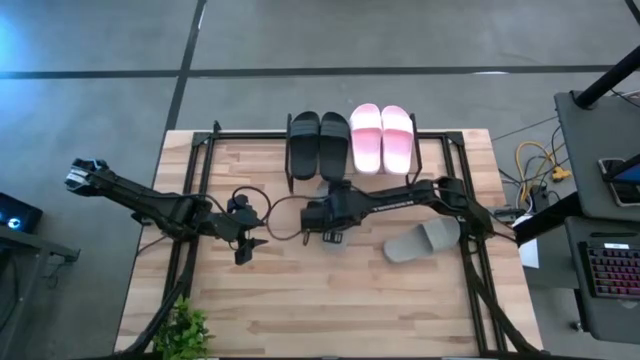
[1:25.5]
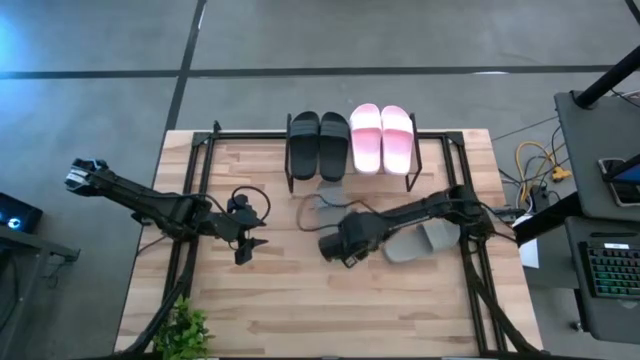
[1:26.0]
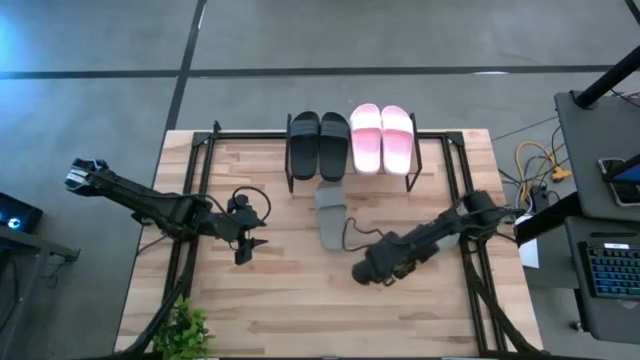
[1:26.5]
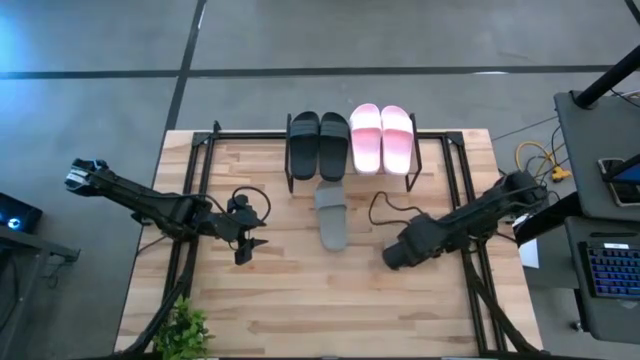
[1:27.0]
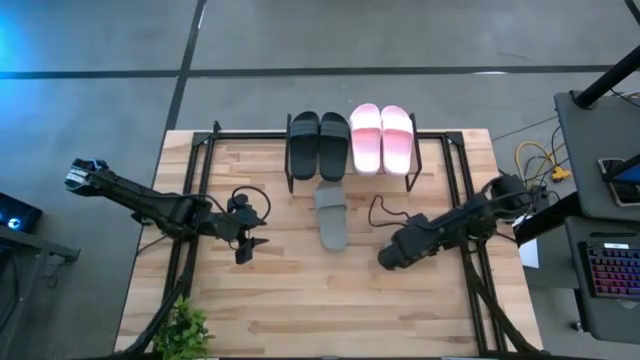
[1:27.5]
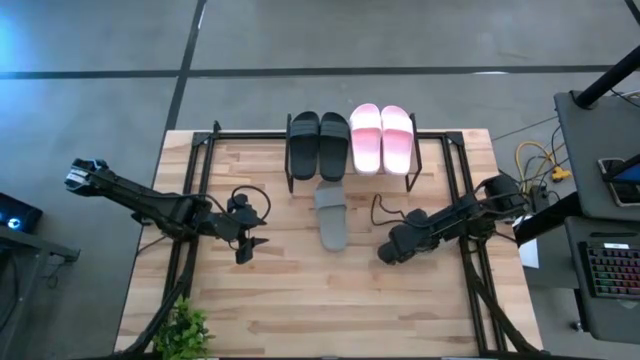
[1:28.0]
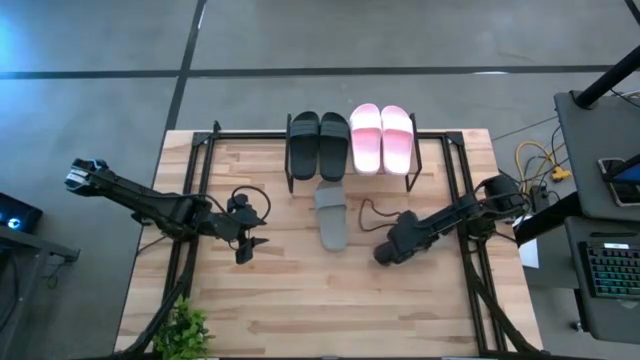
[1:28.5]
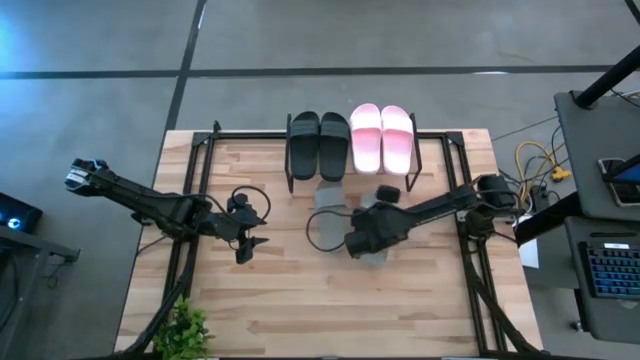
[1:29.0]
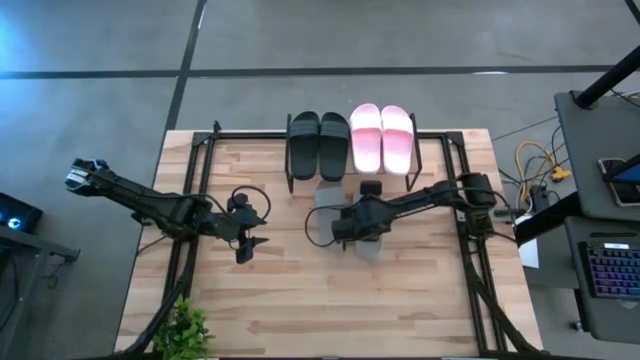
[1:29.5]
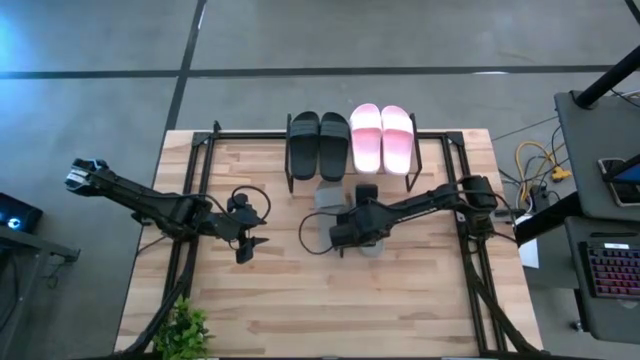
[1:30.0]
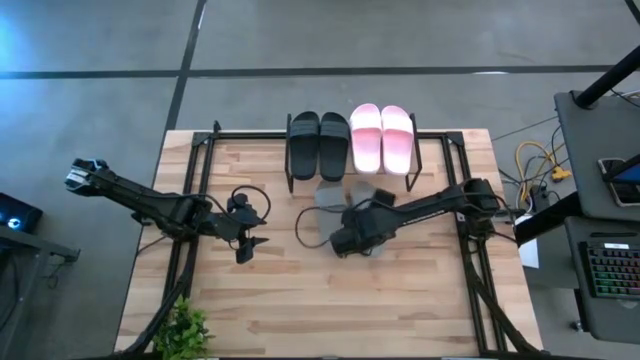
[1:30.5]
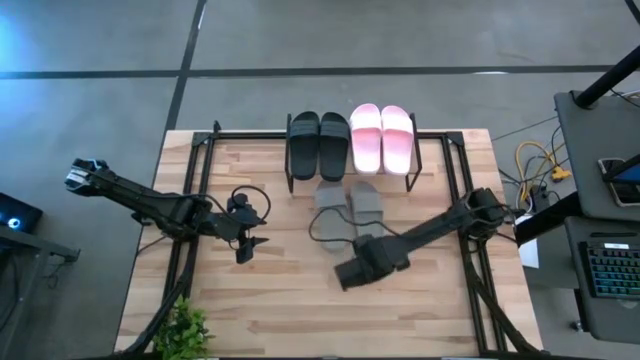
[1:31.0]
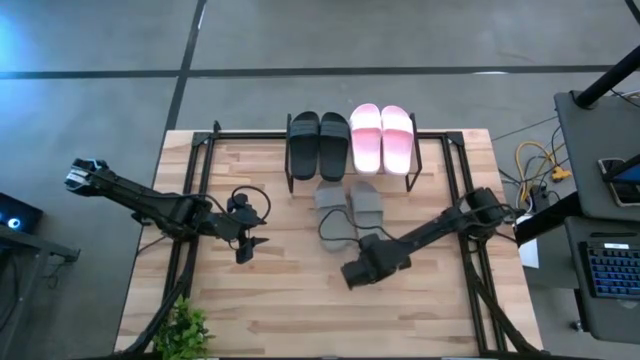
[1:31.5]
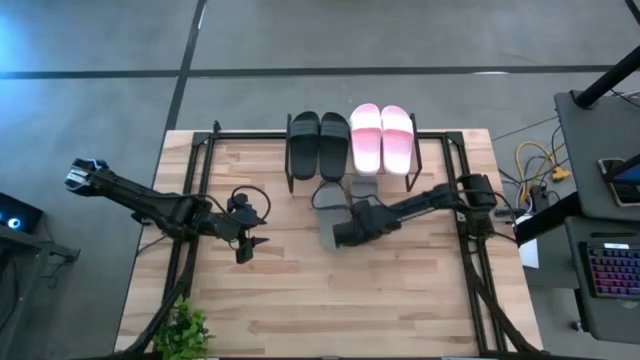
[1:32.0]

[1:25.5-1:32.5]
Task: Pick and place slides into the shelf
Put the right gray slide under the shelf

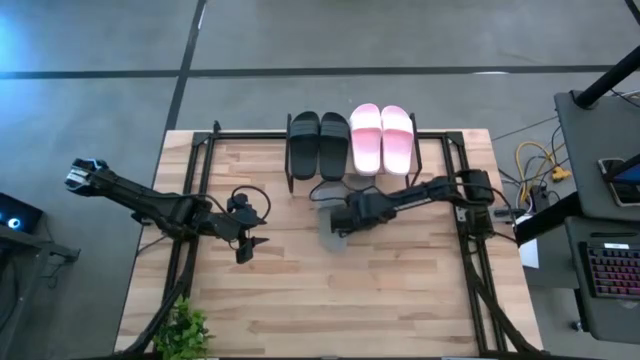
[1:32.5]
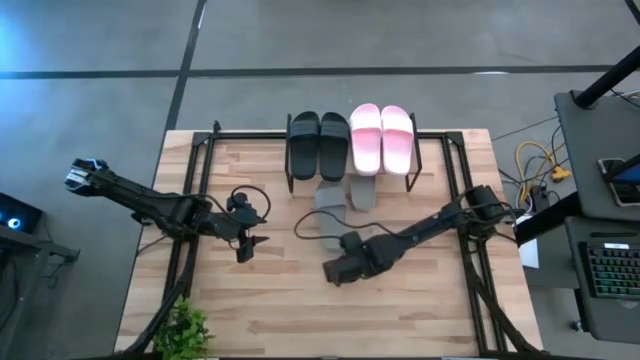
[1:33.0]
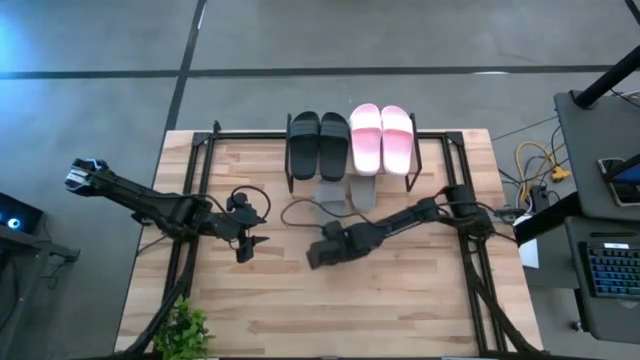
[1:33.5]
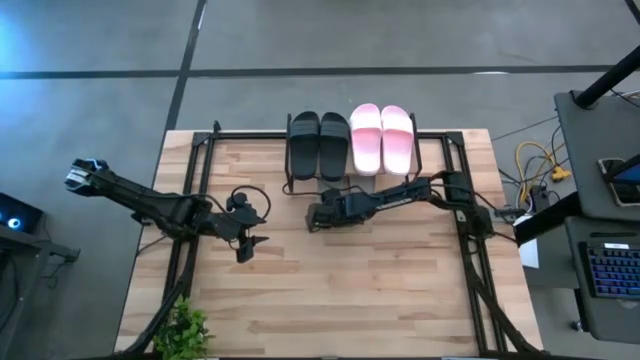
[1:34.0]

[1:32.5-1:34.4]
Move the left gray slide under the shelf

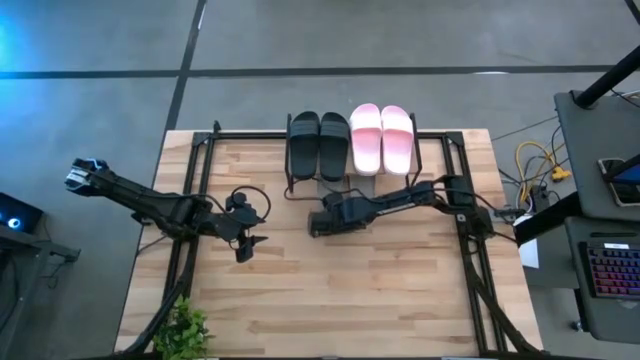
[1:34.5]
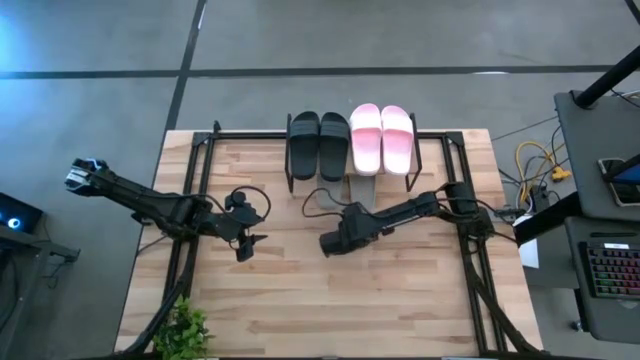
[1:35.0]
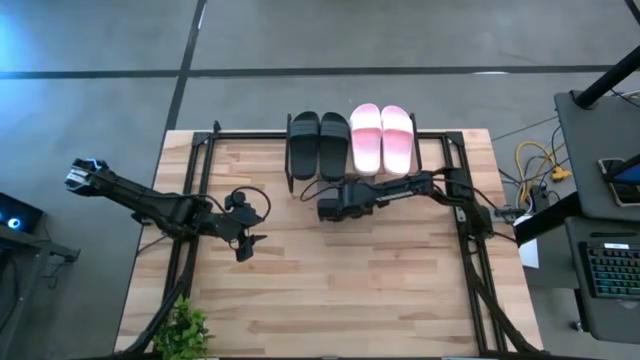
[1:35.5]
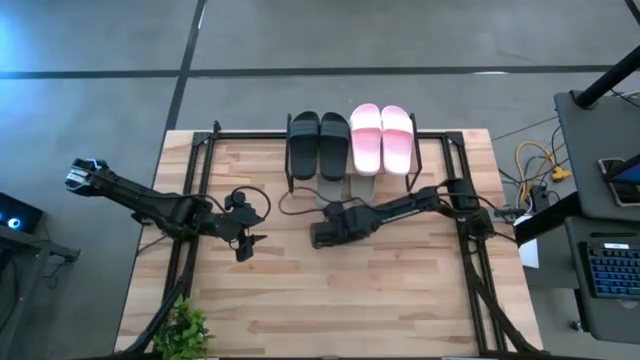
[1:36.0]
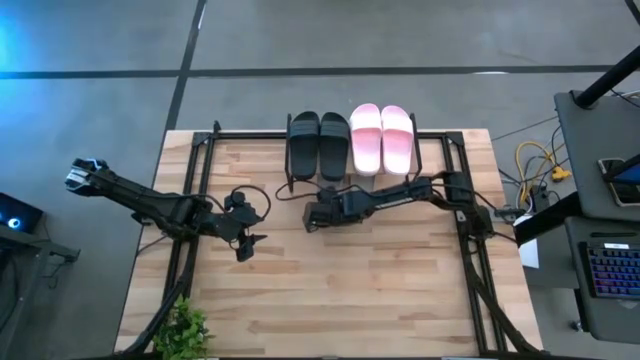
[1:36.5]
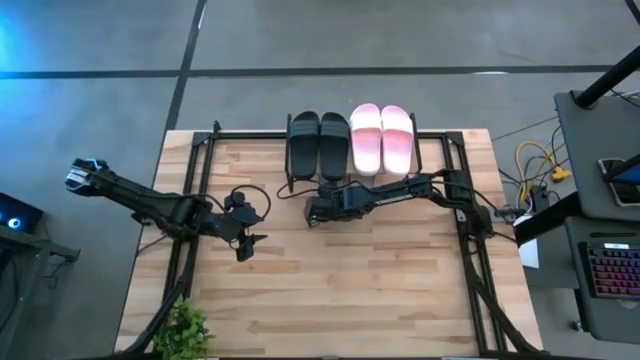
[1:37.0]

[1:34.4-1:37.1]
Adjust the gray slides under the shelf

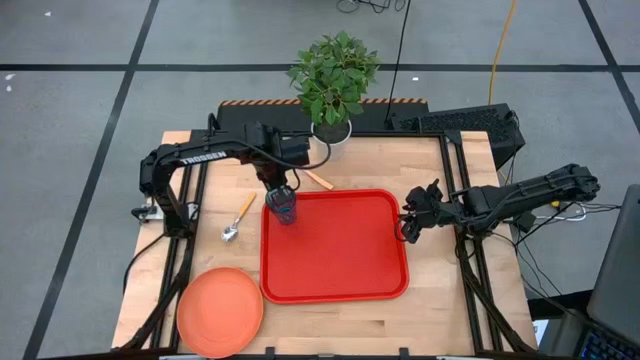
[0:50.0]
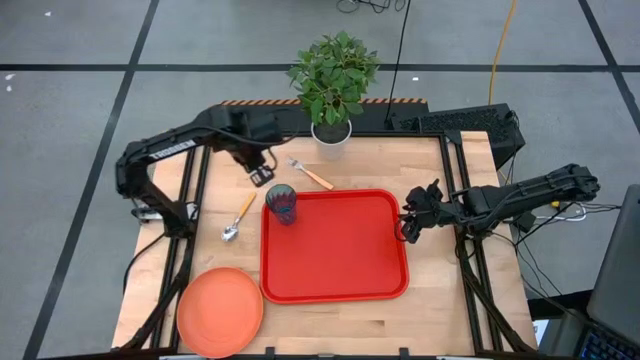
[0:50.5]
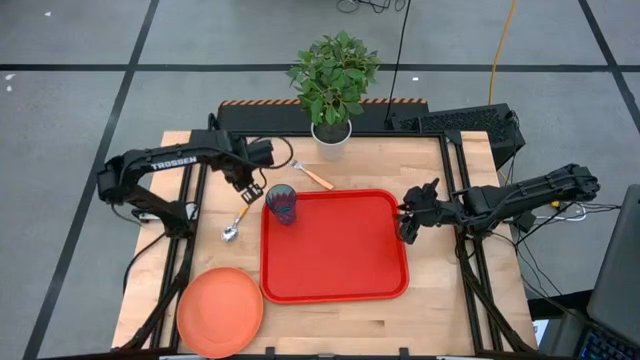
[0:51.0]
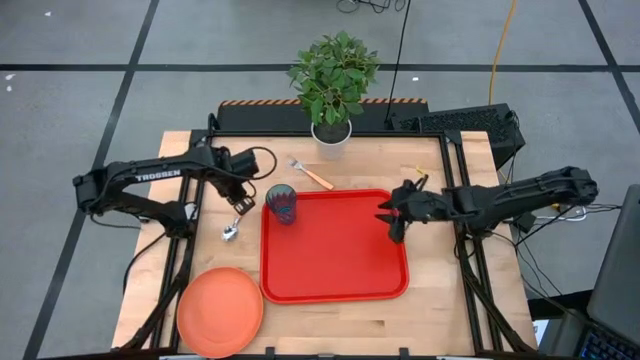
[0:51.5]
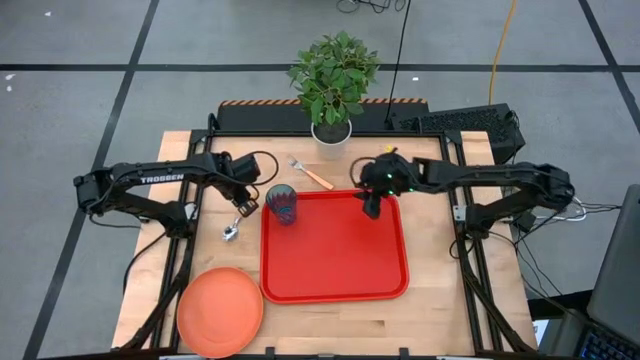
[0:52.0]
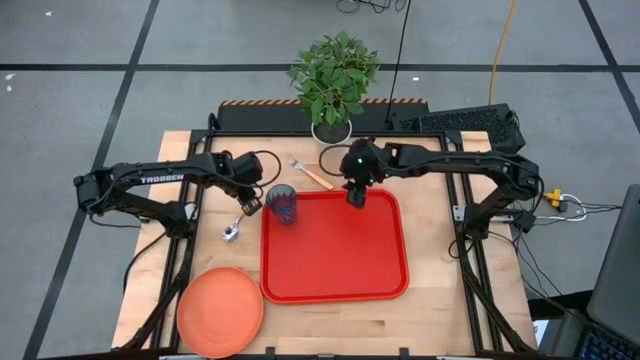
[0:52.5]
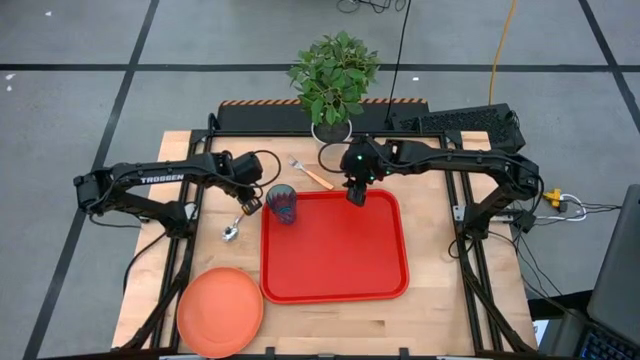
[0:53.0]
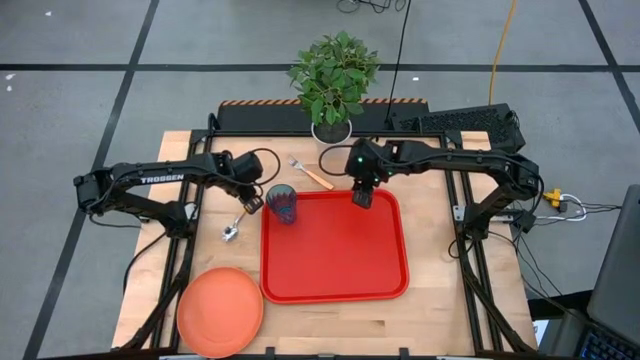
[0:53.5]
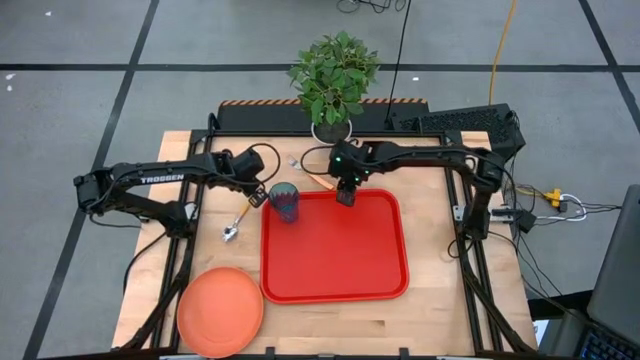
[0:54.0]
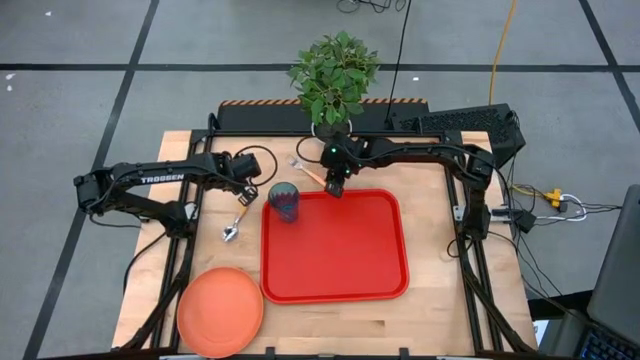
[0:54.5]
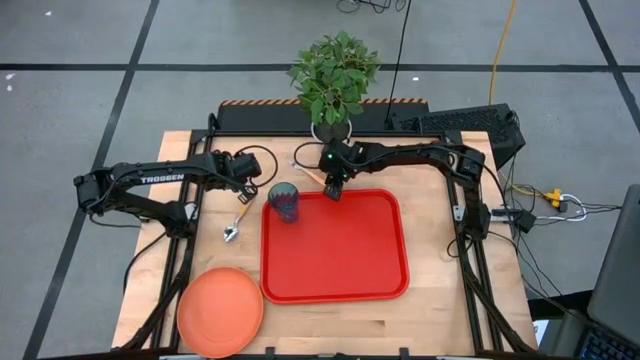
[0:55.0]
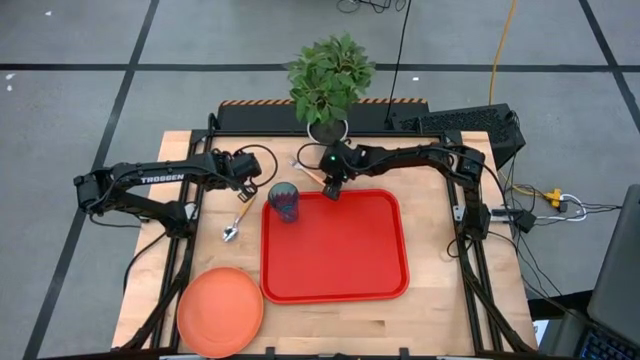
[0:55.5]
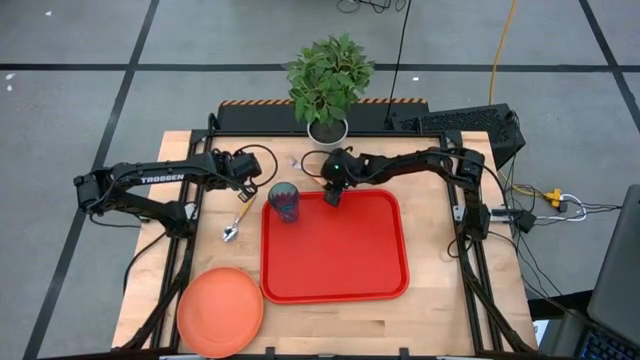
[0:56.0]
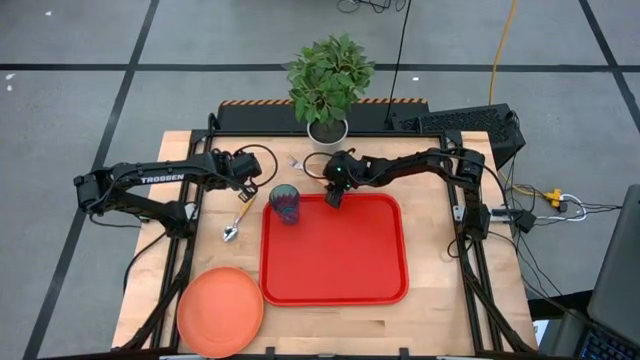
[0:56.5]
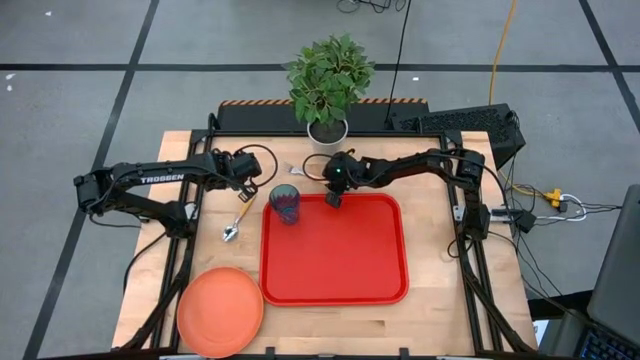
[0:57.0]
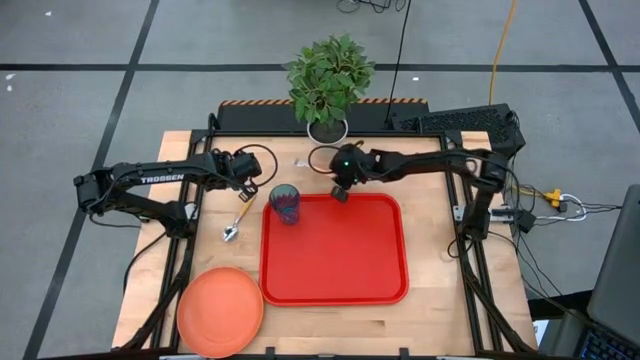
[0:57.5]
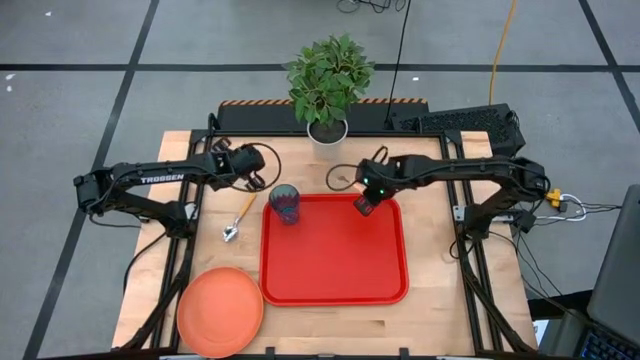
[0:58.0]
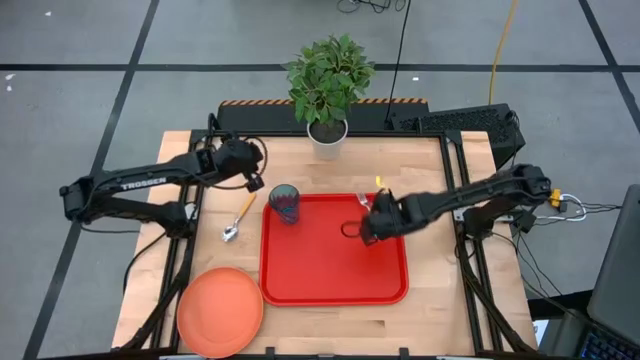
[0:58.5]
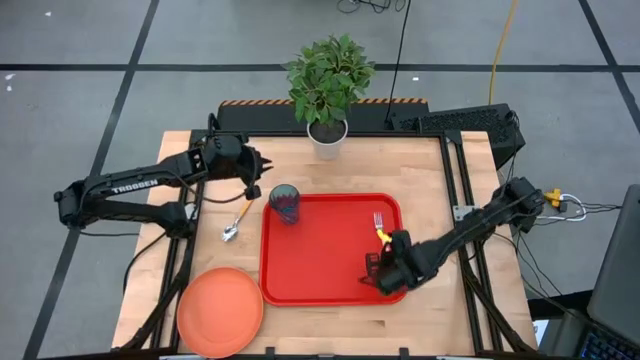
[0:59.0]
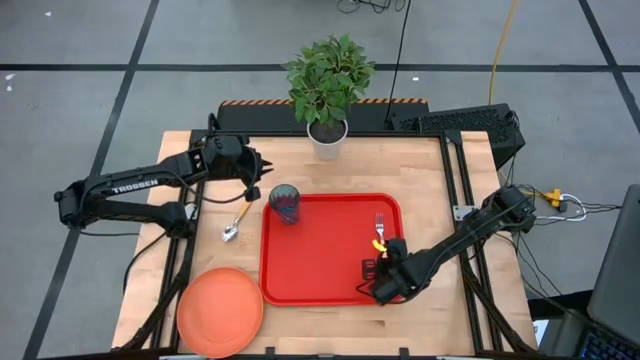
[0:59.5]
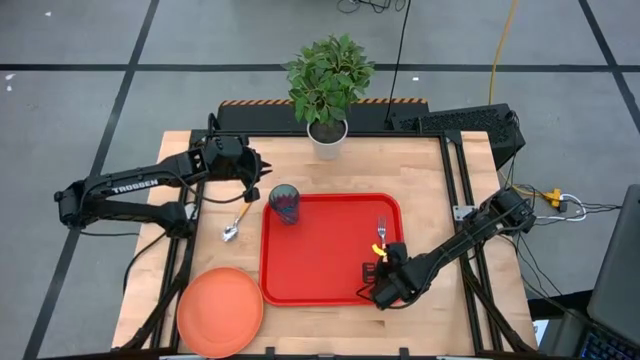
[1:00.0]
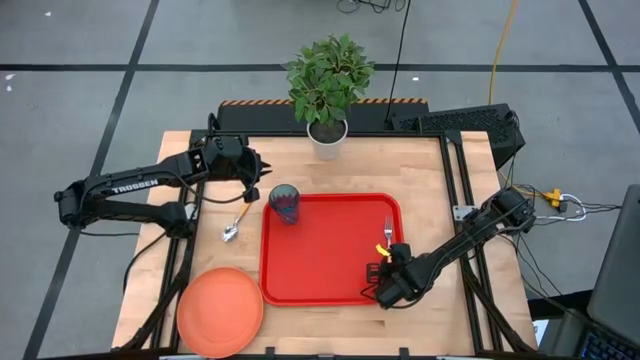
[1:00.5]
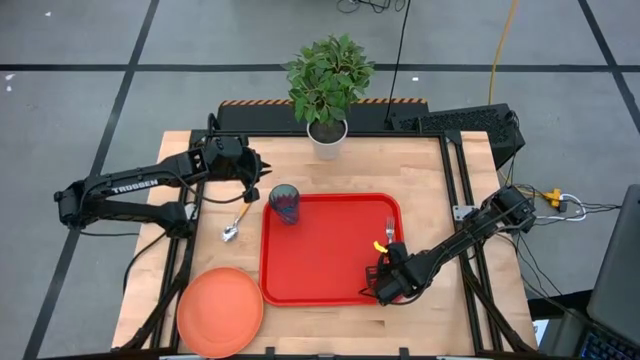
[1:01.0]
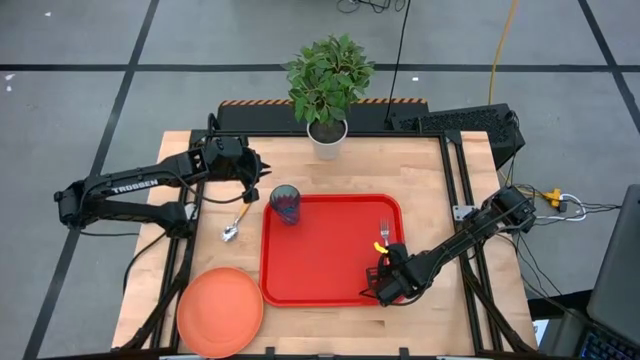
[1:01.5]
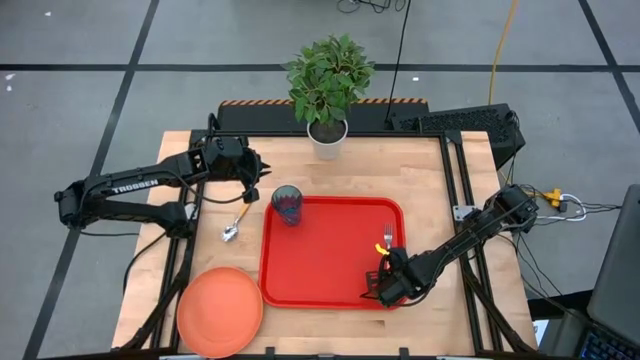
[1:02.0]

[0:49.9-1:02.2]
Task: Pick and place plate/cup/fork/spoon on tray
Put the light brown fork on the left of the red tray
